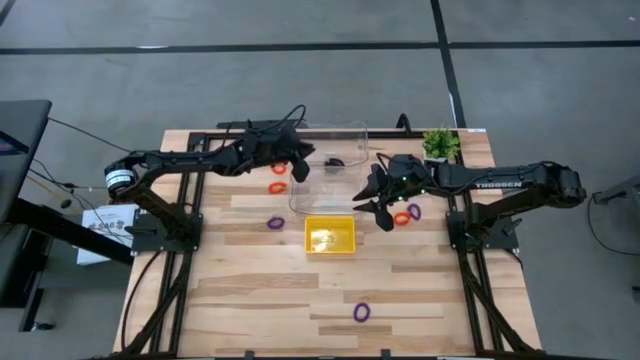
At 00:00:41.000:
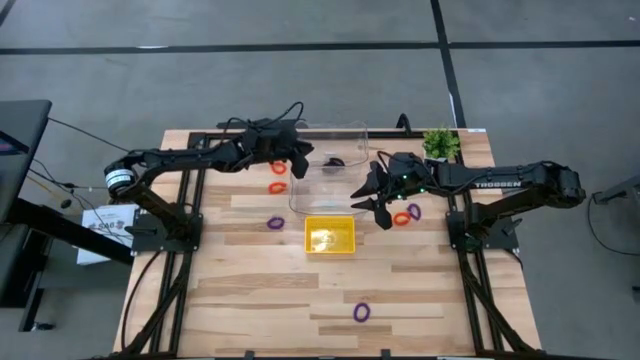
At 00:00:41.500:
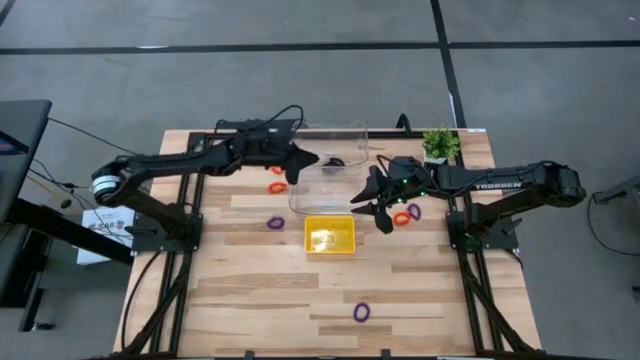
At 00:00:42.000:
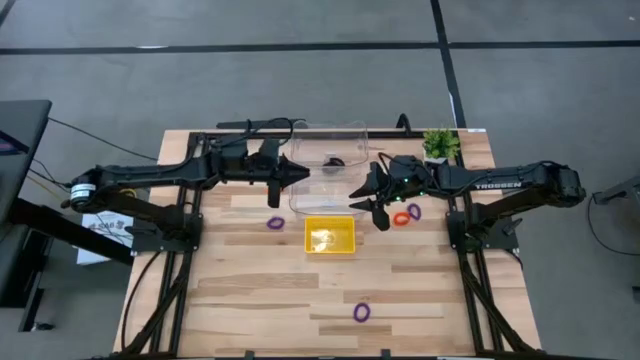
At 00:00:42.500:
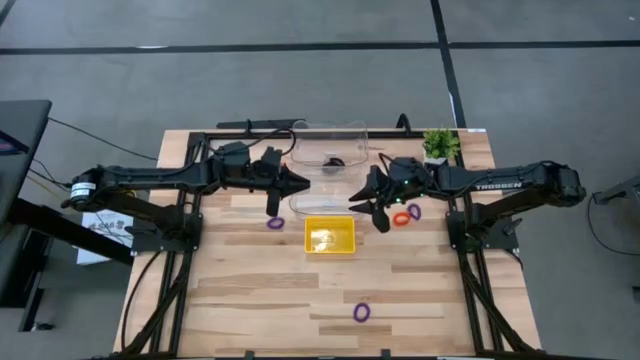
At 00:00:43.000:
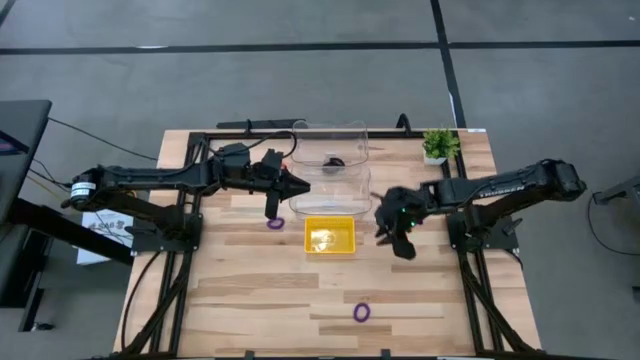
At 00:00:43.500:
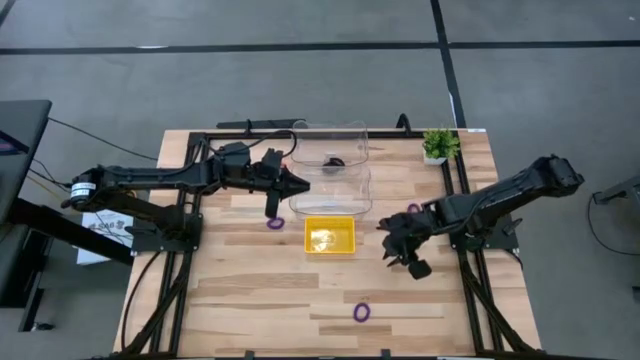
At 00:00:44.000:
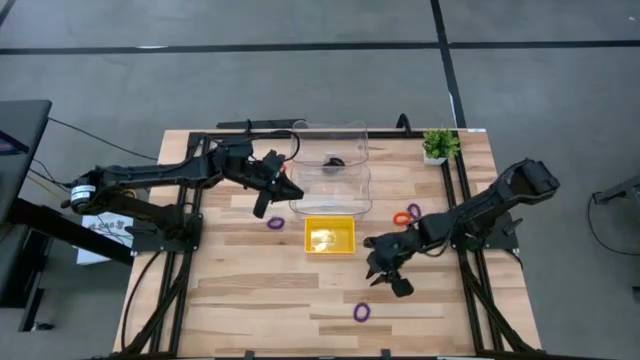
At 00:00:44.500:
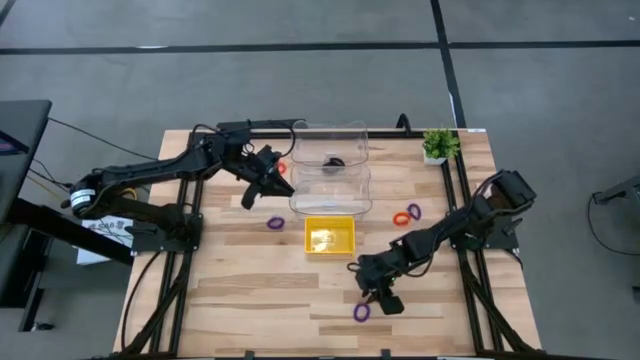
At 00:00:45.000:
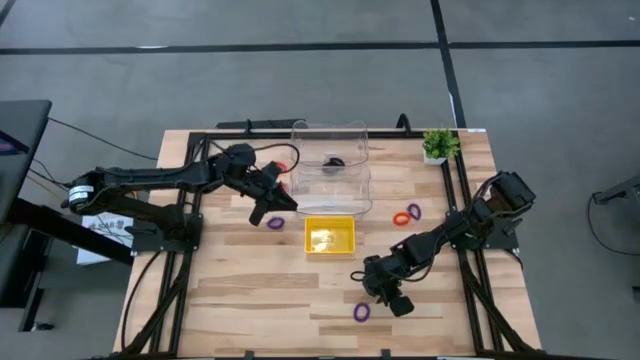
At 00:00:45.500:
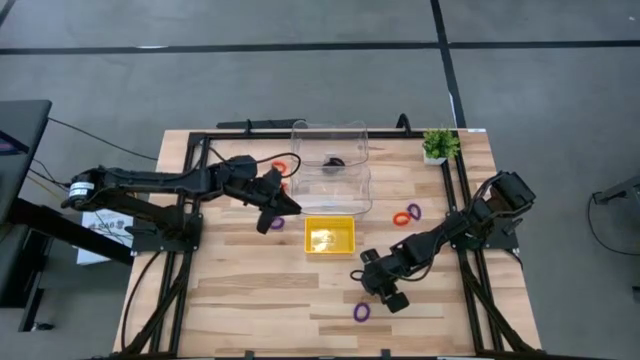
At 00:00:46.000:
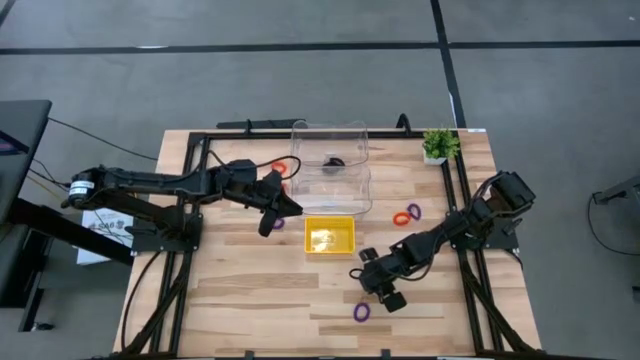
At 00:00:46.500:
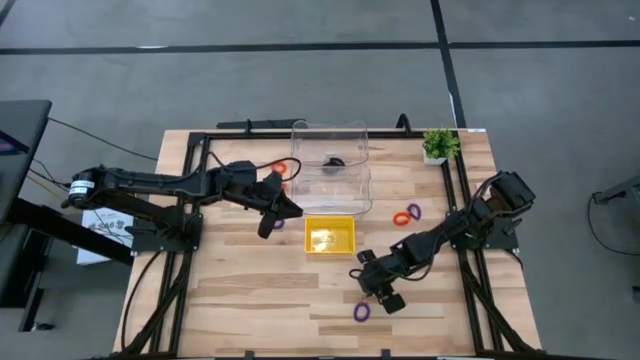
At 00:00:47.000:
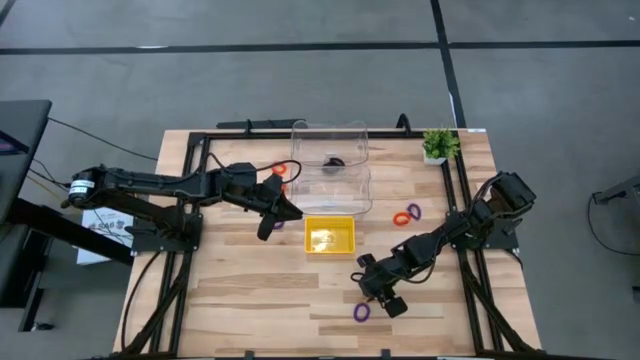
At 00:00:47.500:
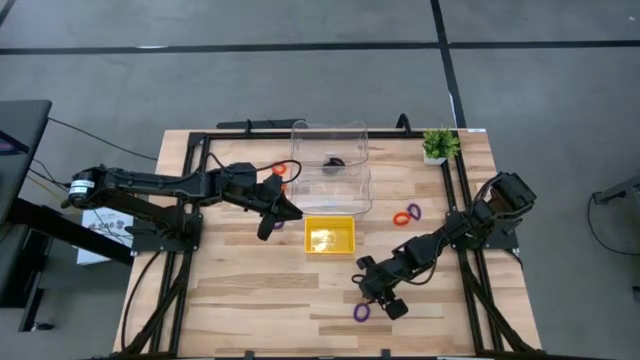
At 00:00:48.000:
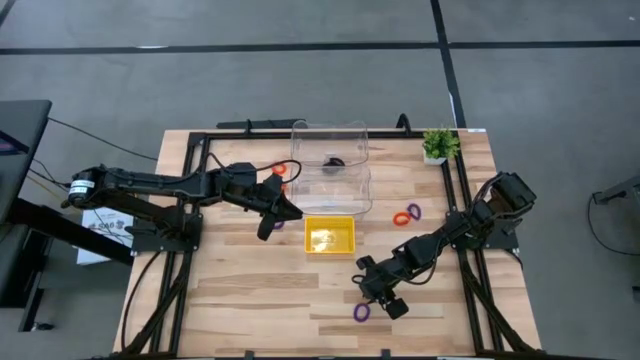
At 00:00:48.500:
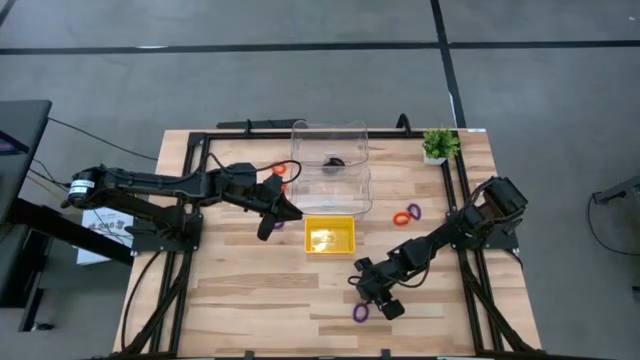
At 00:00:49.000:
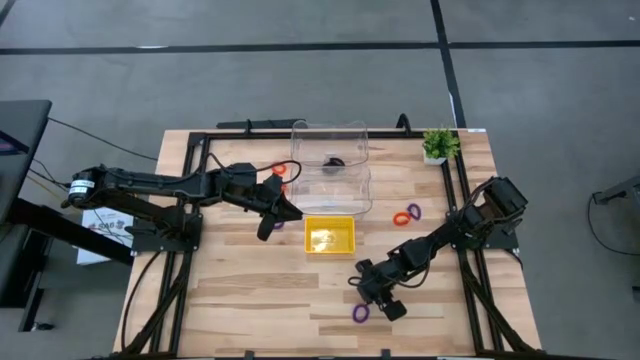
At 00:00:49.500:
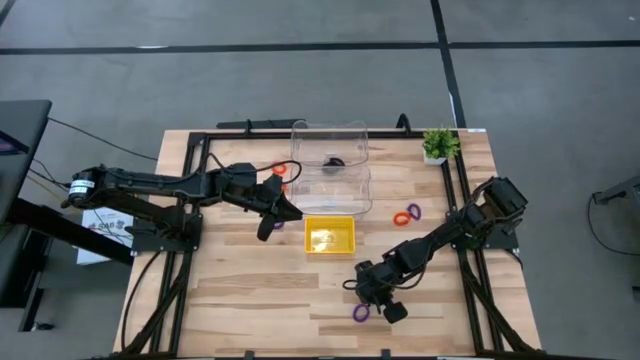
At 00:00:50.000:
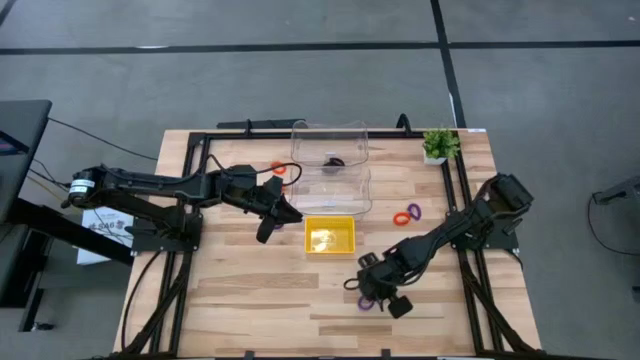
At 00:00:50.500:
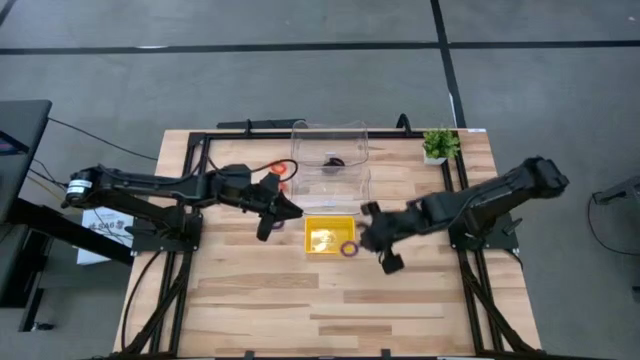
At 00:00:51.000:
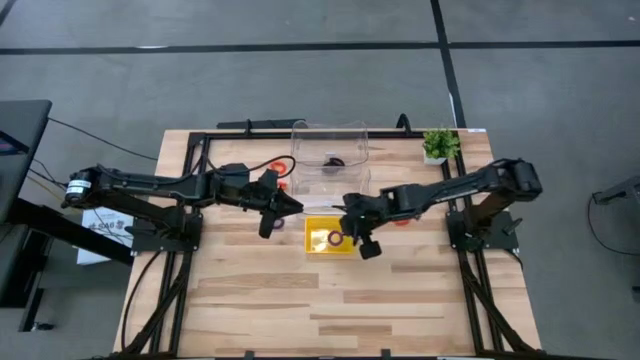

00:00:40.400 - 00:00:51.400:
Task: Sort spring keychains
Put the bottom purple spring keychain into the yellow bin

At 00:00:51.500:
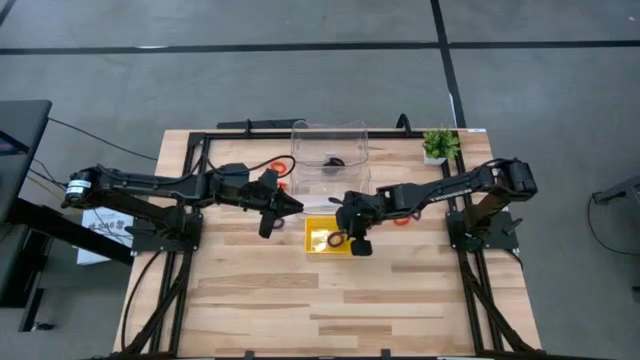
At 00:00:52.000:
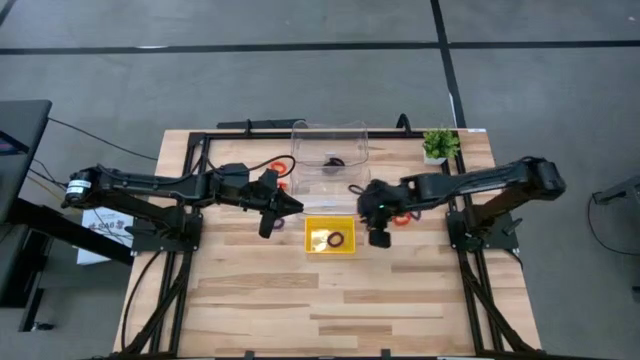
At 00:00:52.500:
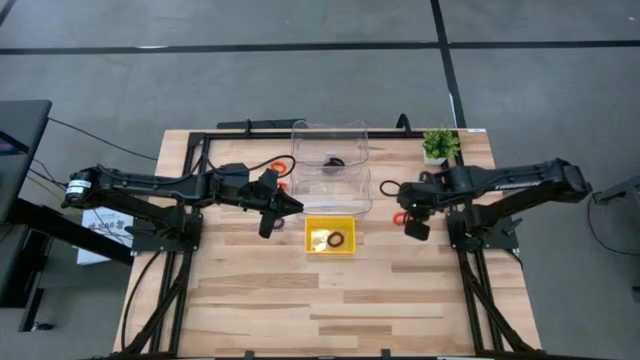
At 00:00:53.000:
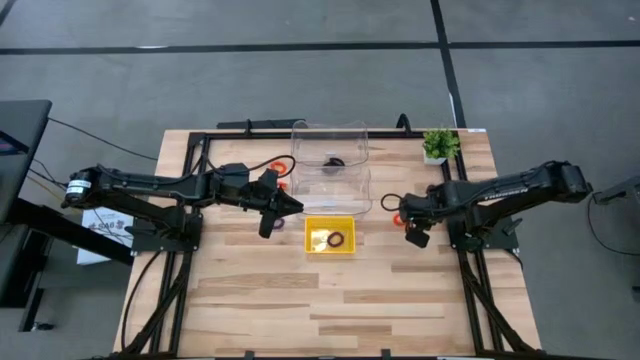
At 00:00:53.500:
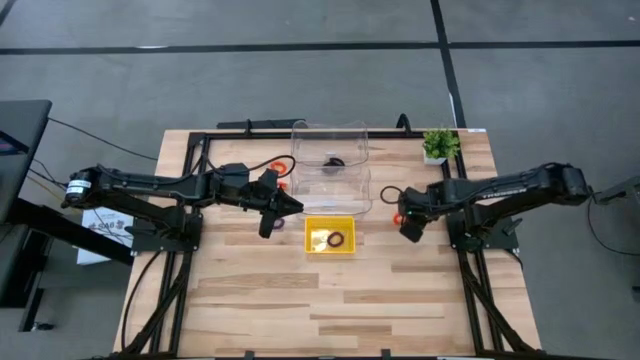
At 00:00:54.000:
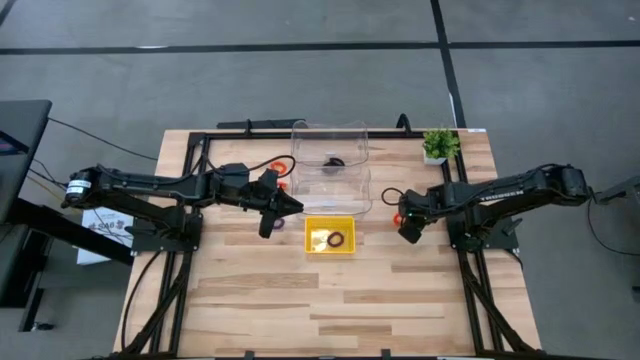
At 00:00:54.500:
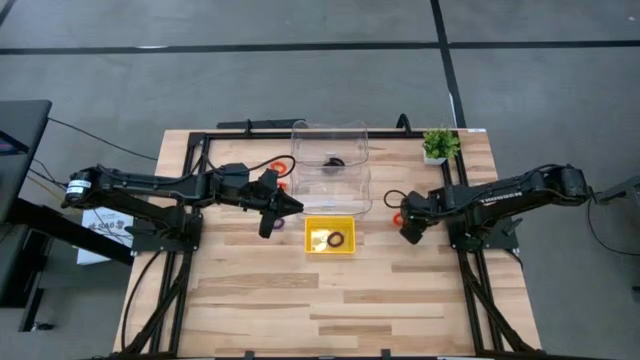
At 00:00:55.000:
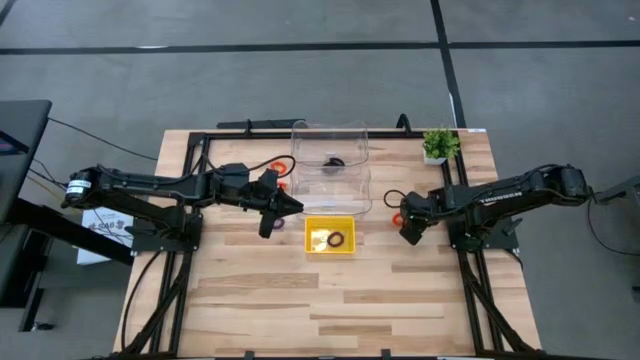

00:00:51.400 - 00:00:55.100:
Put the right purple spring keychain into the yellow bin

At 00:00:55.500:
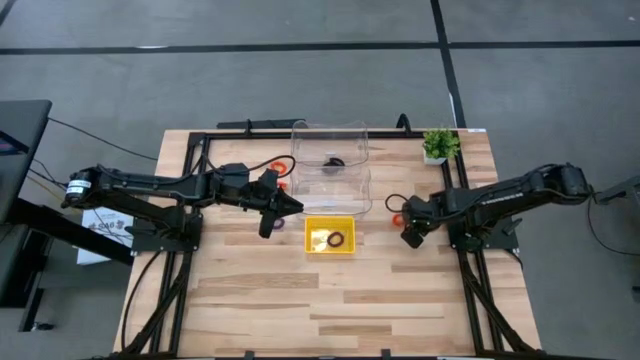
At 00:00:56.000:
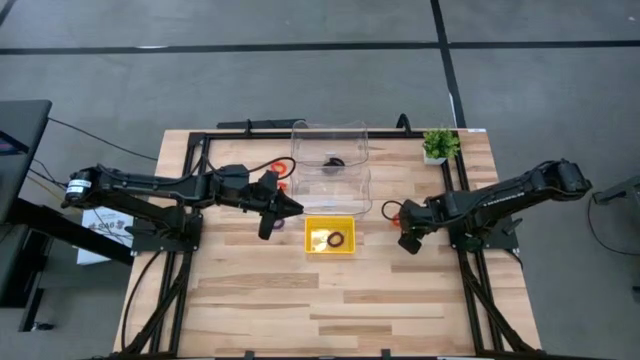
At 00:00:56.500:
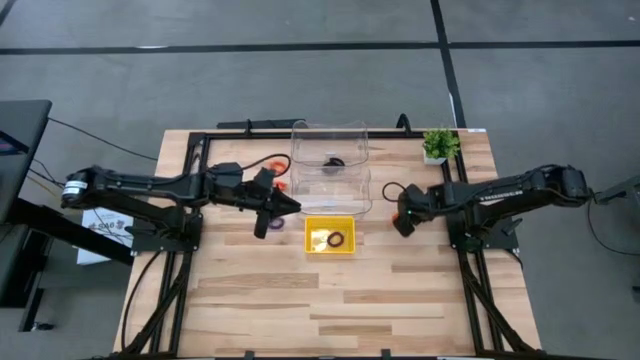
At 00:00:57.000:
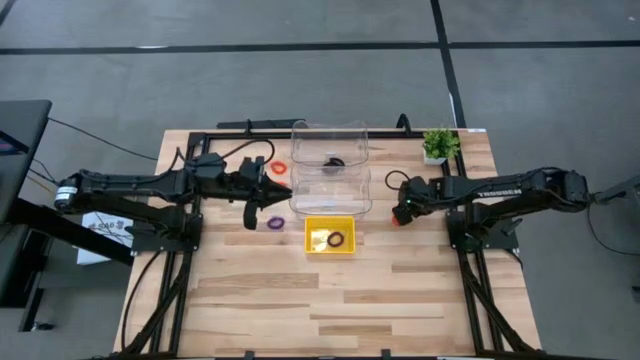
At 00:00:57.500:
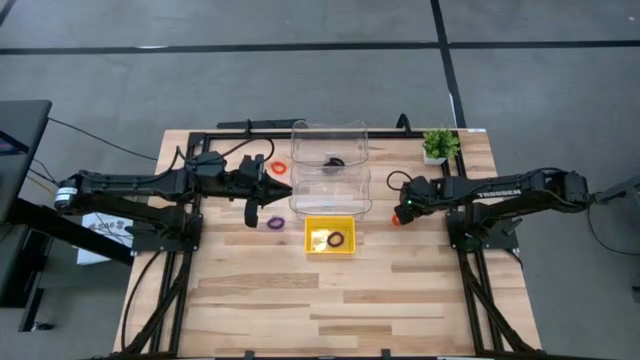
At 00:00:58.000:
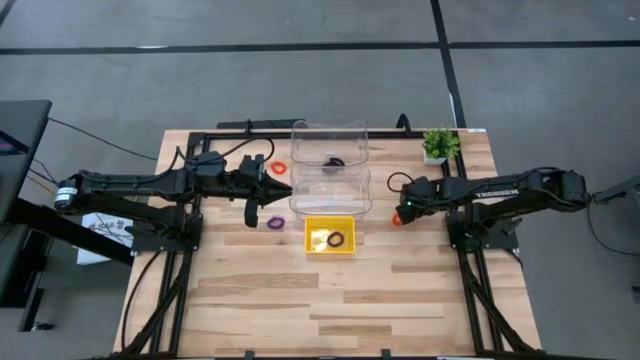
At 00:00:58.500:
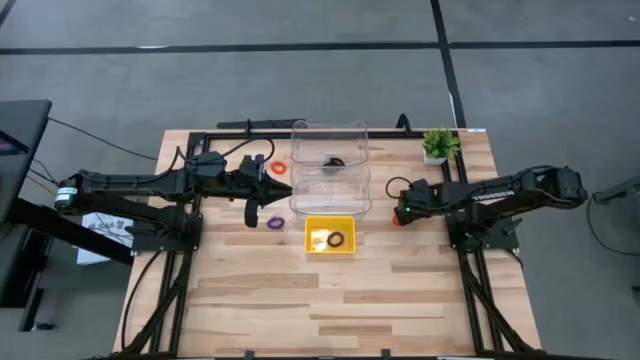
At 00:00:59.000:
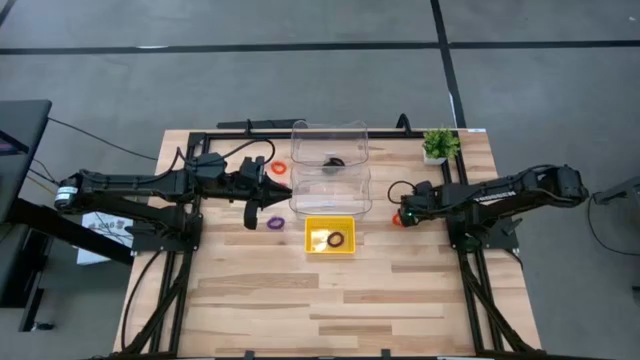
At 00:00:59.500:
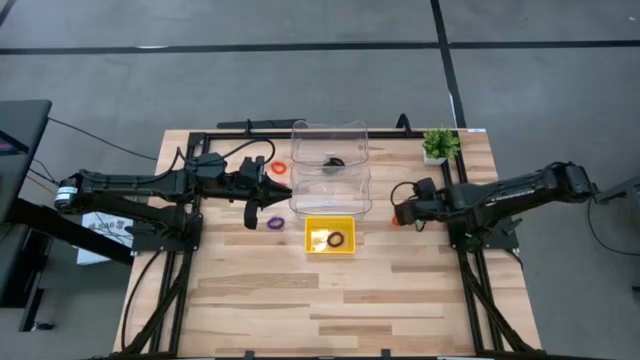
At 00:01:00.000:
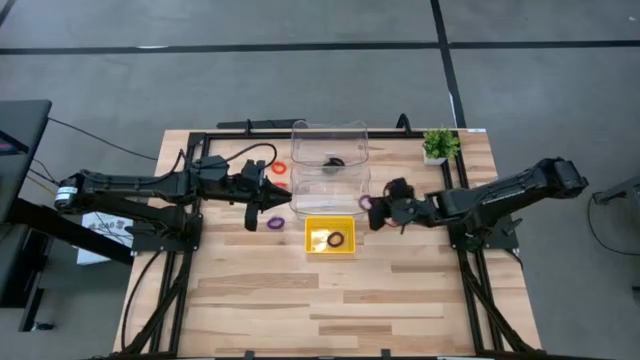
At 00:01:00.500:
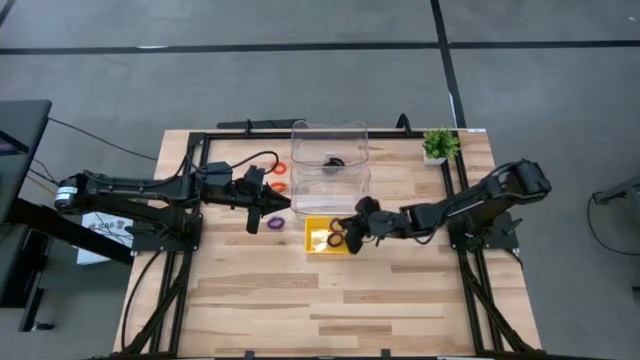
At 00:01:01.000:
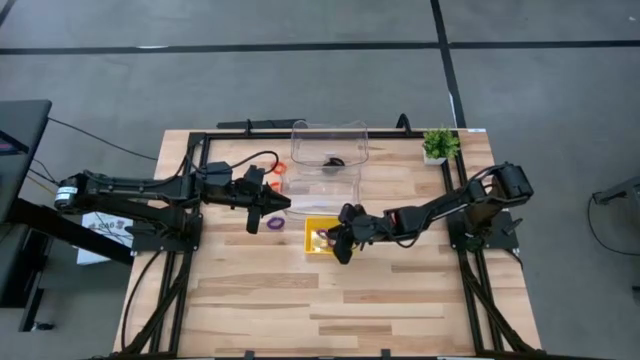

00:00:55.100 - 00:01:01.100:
Put the right purple spring keychain into the yellow bin

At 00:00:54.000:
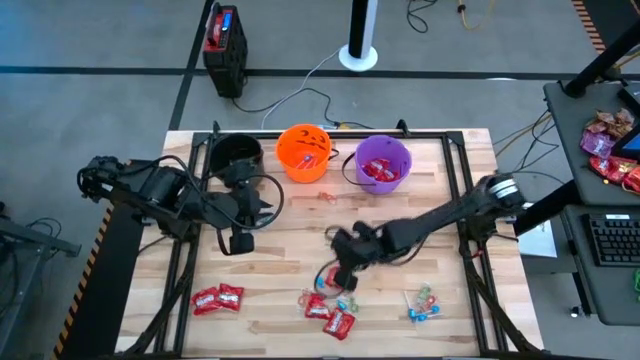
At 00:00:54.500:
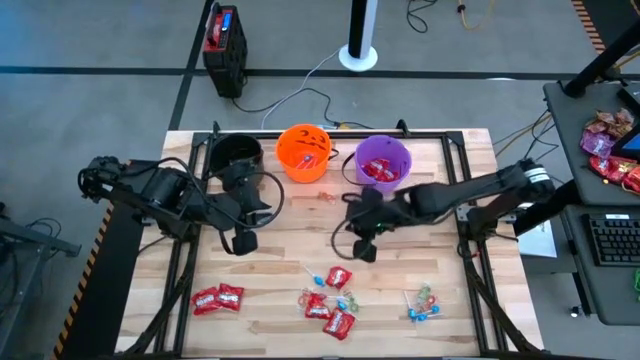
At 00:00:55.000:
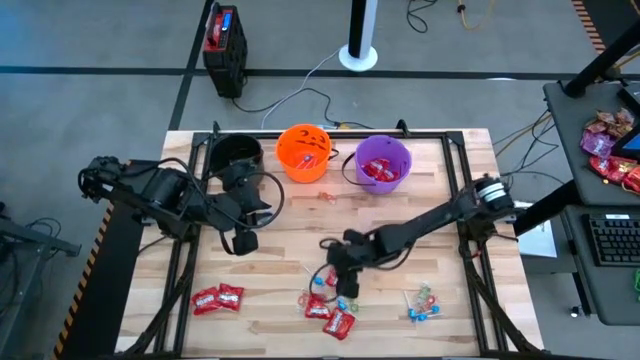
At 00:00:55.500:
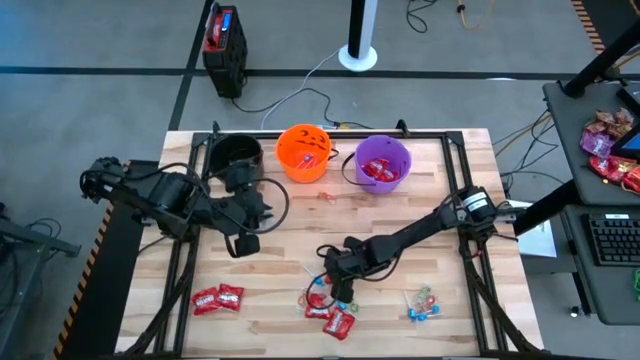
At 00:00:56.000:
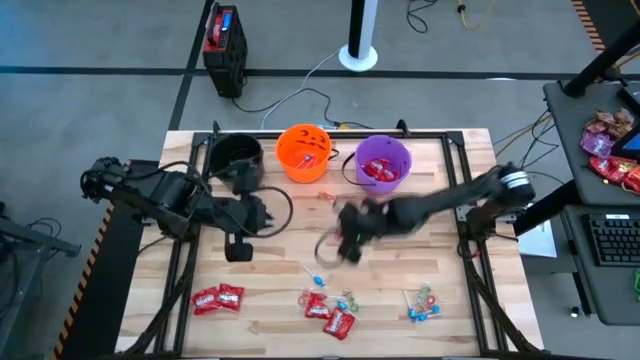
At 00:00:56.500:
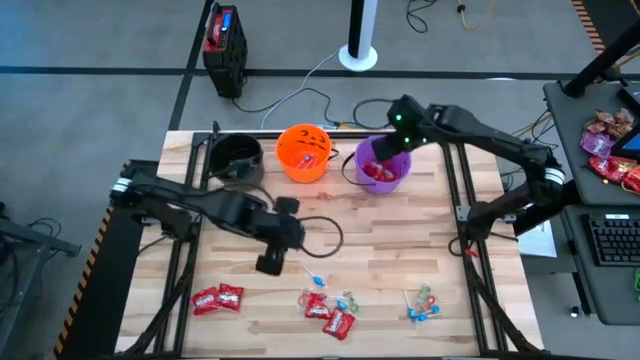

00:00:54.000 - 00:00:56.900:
Task: Sort candy by brand, put in halloween buckets
Put the red candy into the violet bucket
